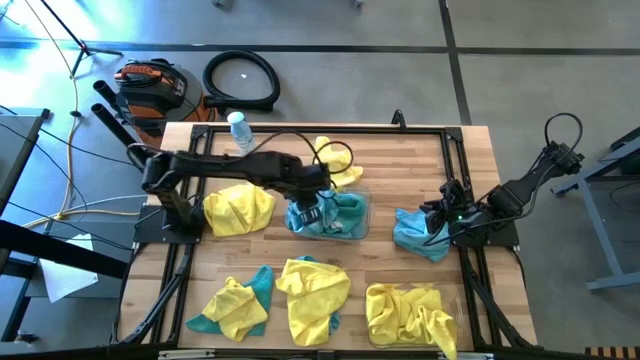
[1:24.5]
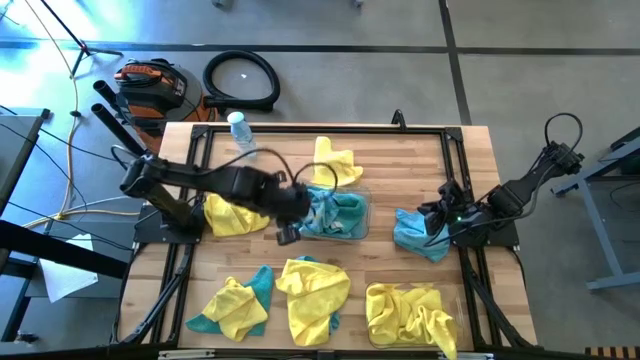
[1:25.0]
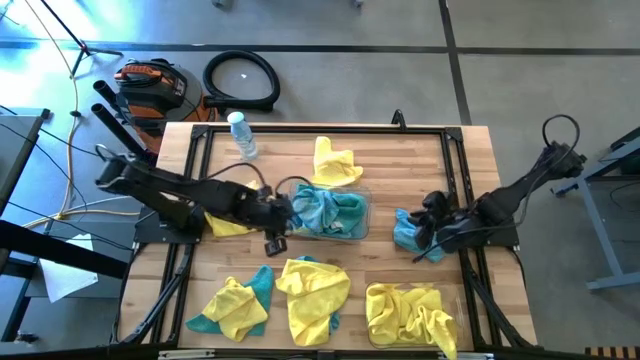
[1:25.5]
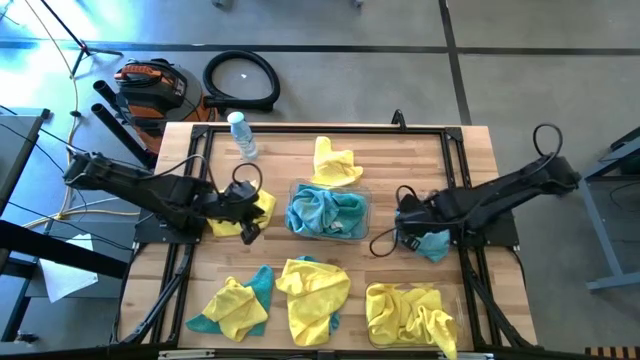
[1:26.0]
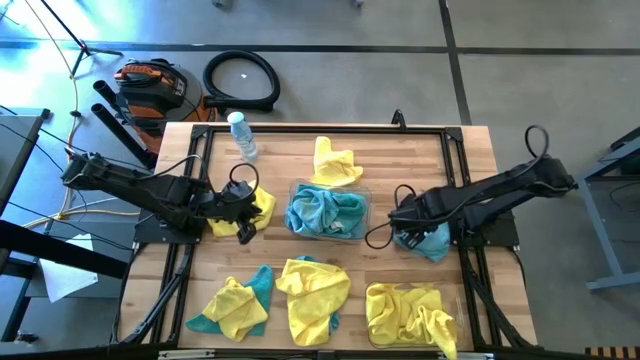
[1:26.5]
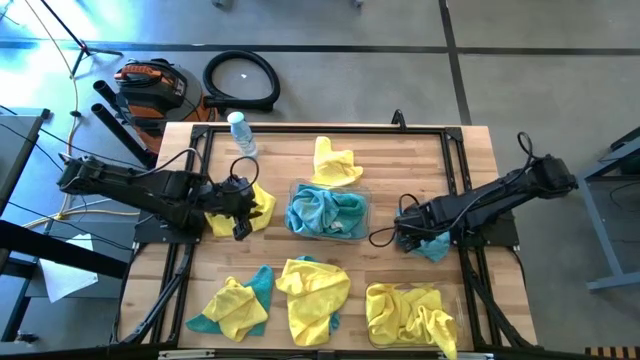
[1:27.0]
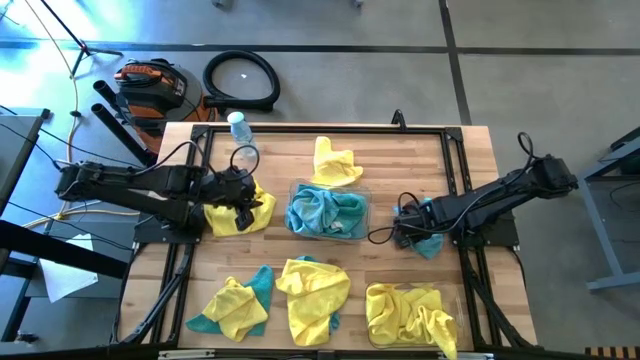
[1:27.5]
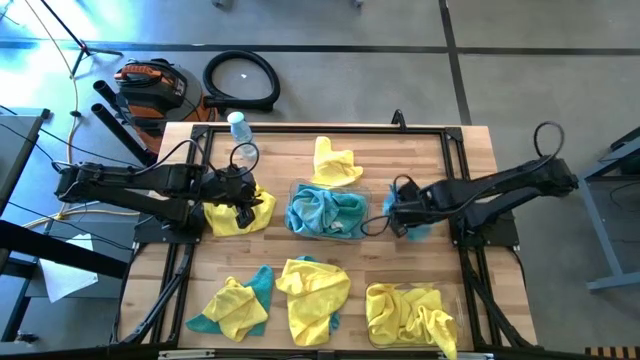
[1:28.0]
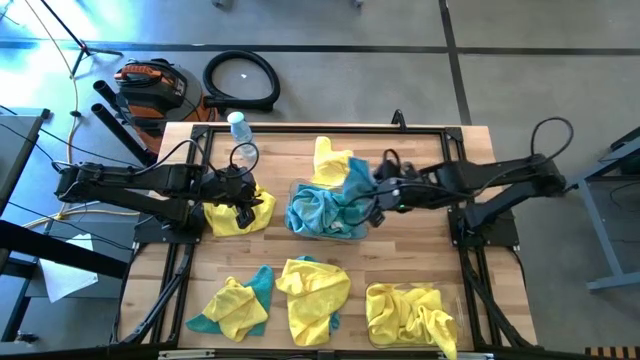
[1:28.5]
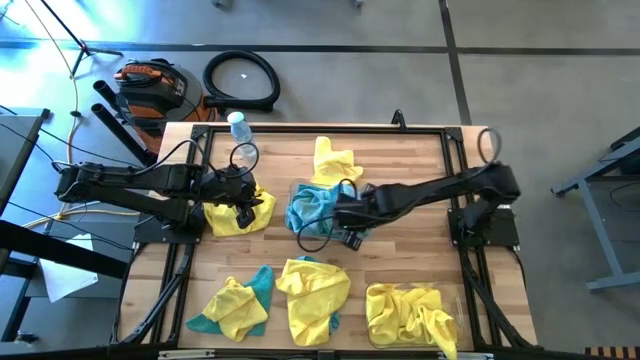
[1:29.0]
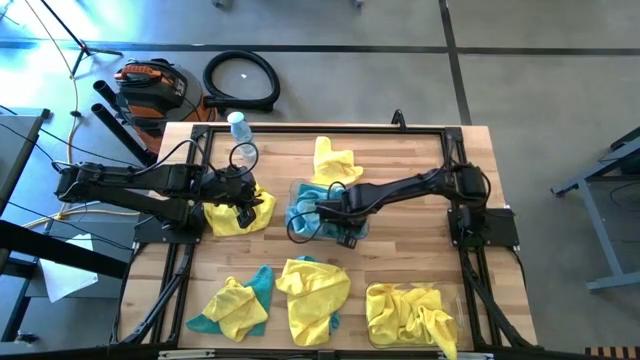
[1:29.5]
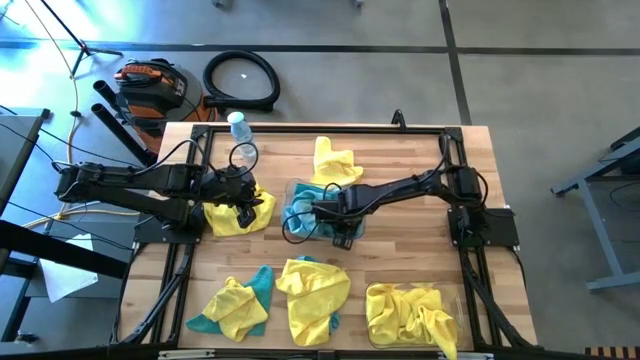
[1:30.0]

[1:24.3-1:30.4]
Task: Sort microfiber towel by color & place in baskets
Put the blue towel in the top transparent bin

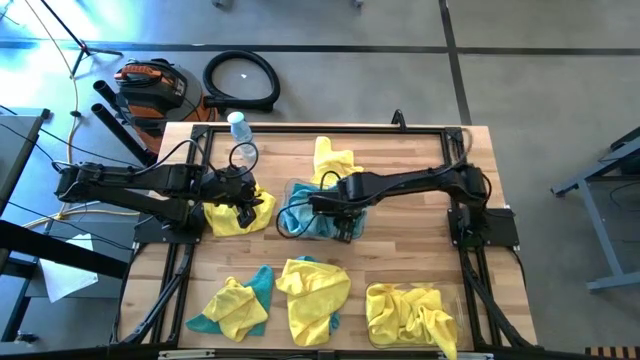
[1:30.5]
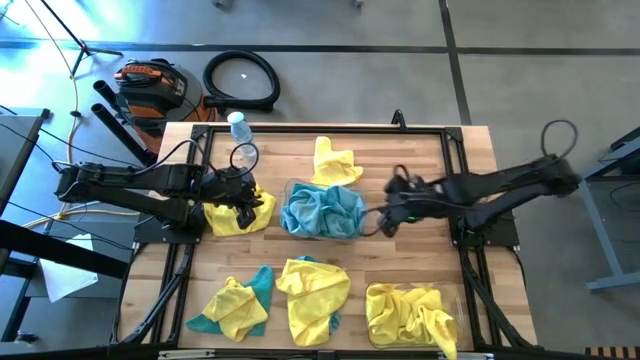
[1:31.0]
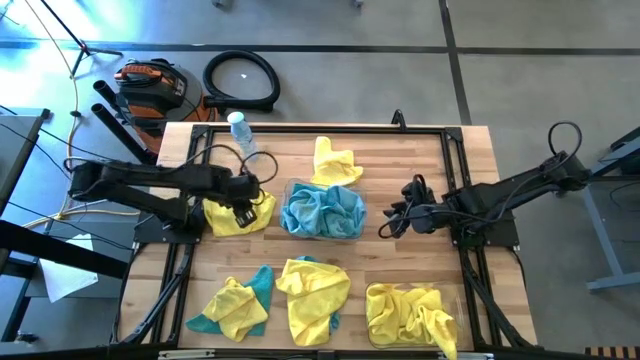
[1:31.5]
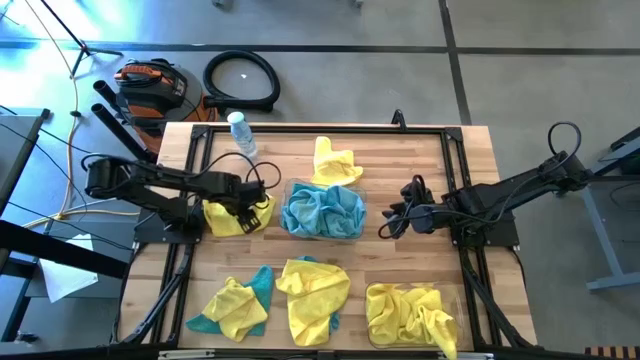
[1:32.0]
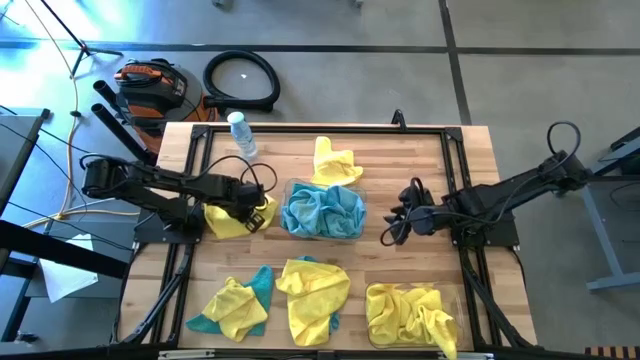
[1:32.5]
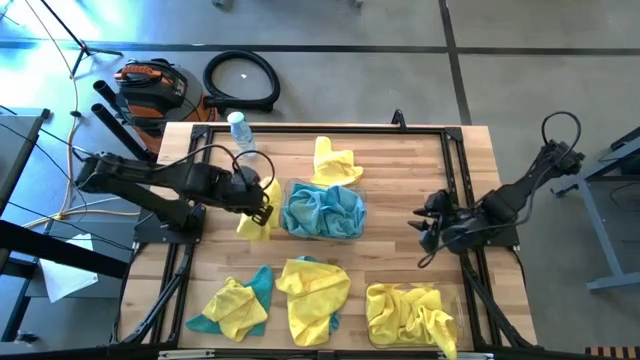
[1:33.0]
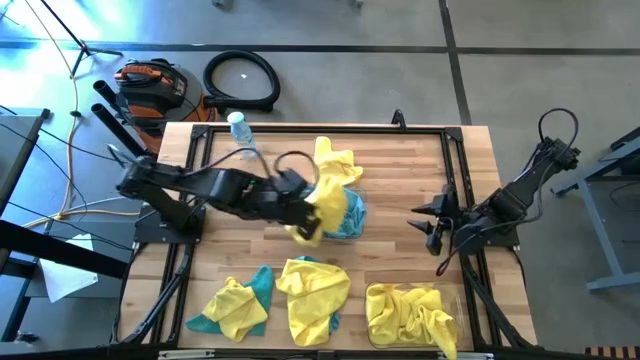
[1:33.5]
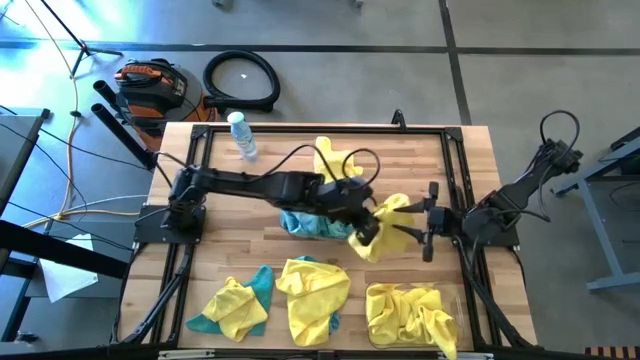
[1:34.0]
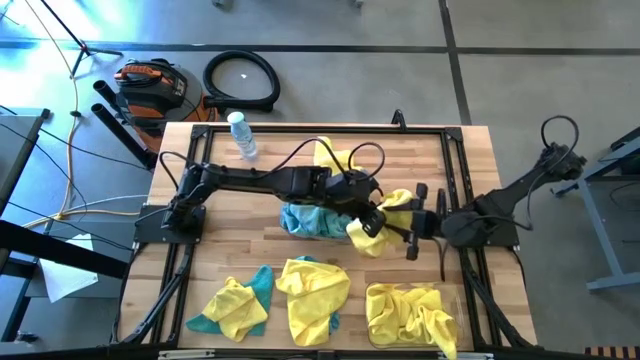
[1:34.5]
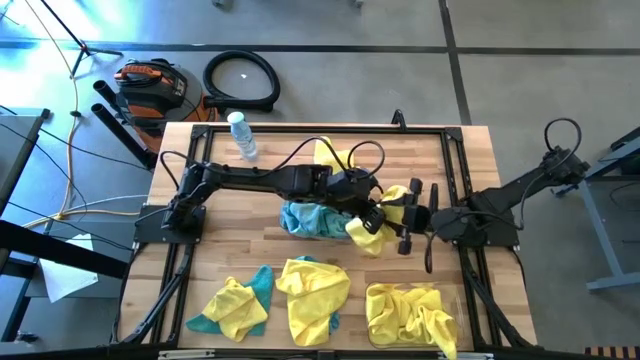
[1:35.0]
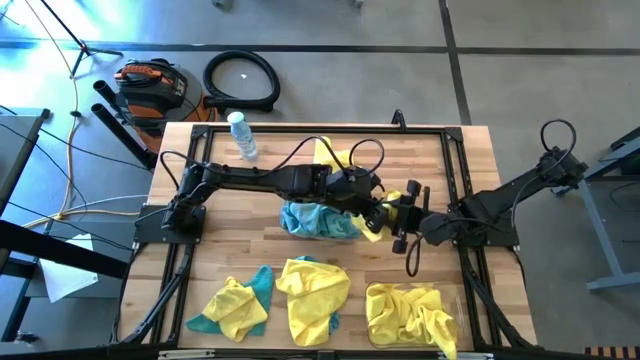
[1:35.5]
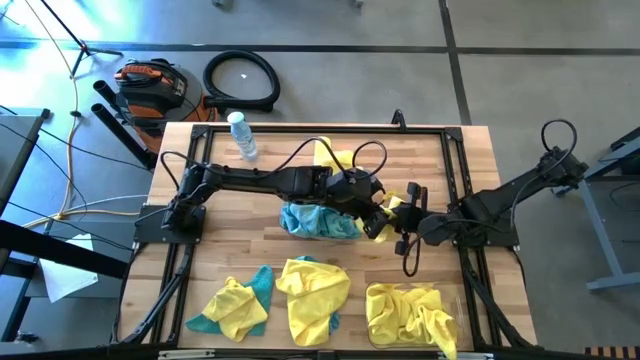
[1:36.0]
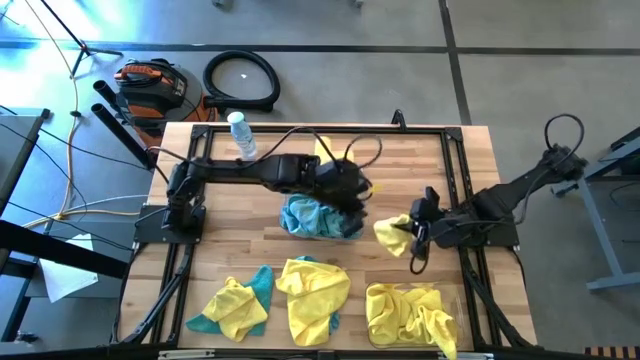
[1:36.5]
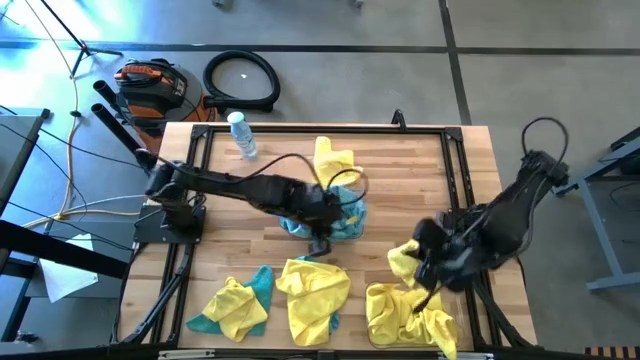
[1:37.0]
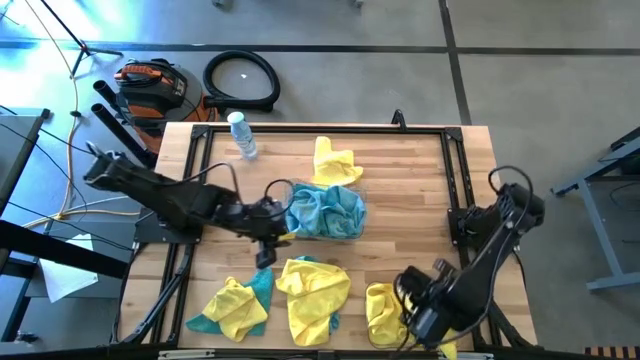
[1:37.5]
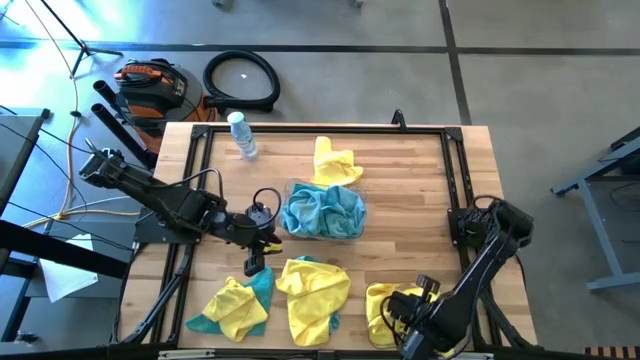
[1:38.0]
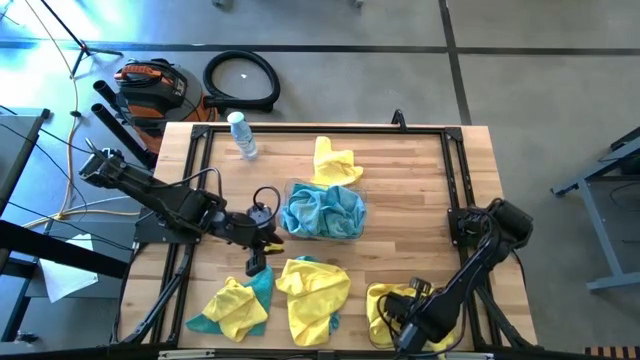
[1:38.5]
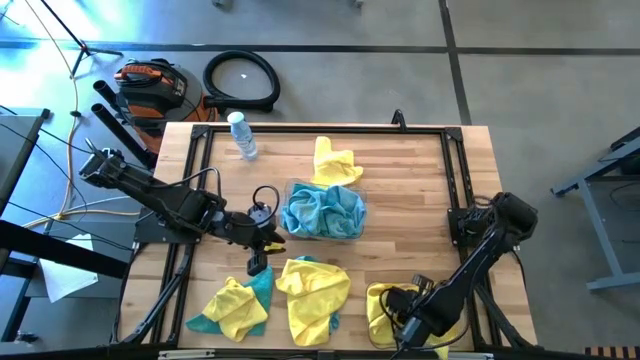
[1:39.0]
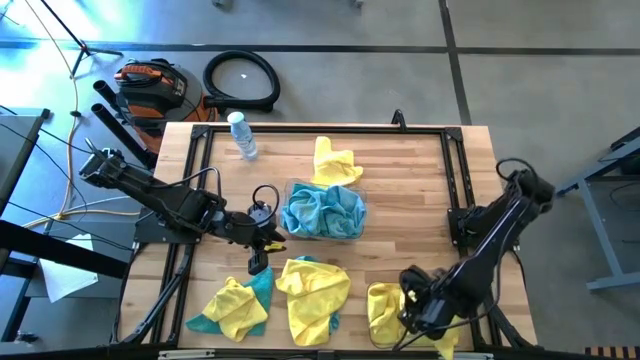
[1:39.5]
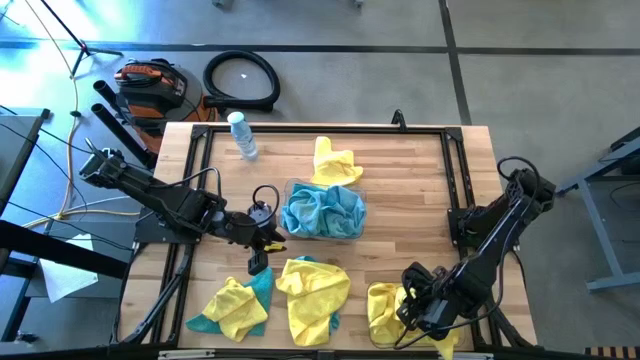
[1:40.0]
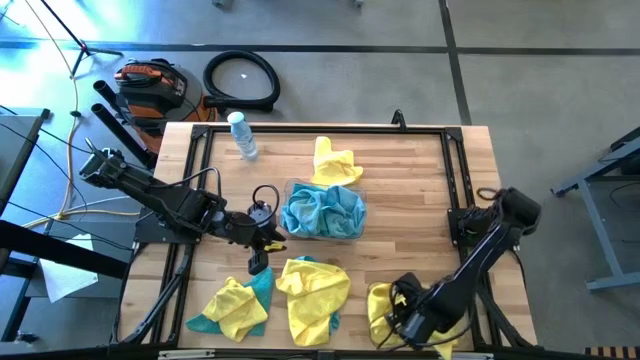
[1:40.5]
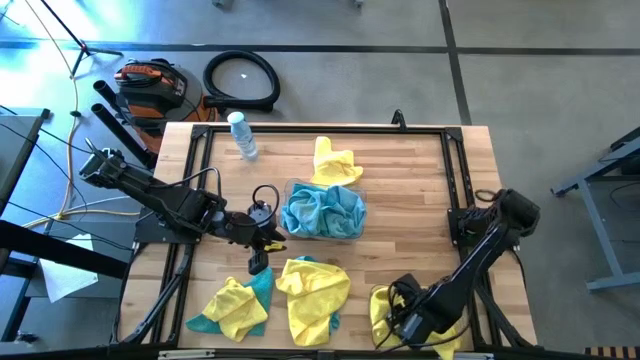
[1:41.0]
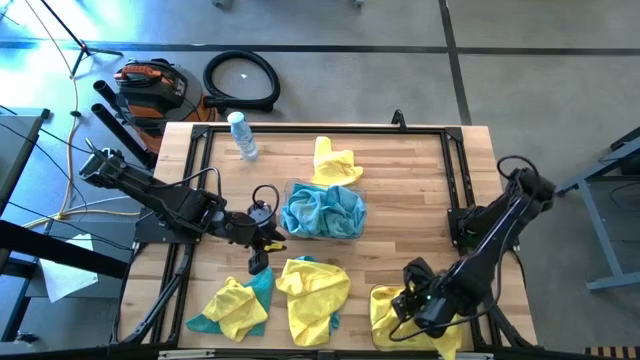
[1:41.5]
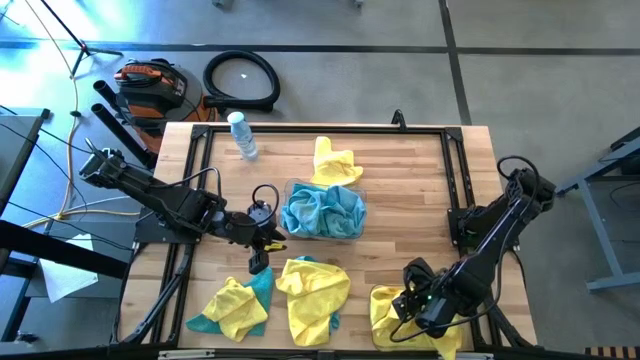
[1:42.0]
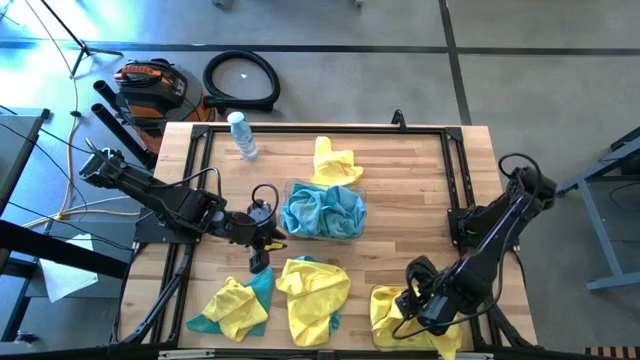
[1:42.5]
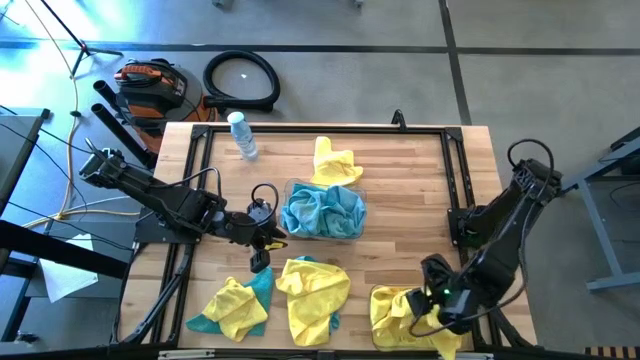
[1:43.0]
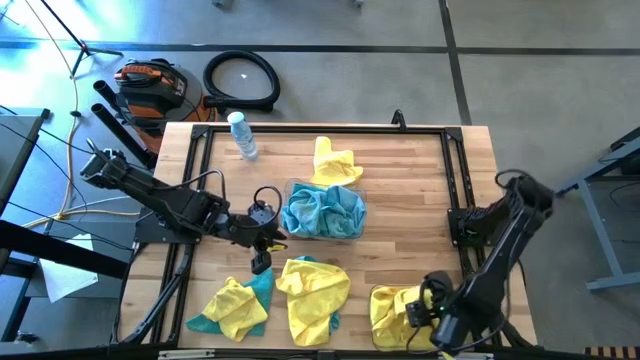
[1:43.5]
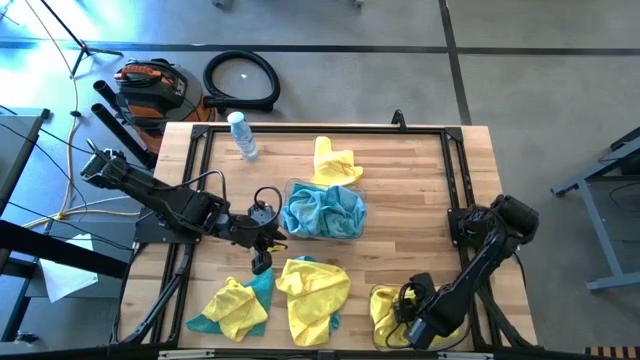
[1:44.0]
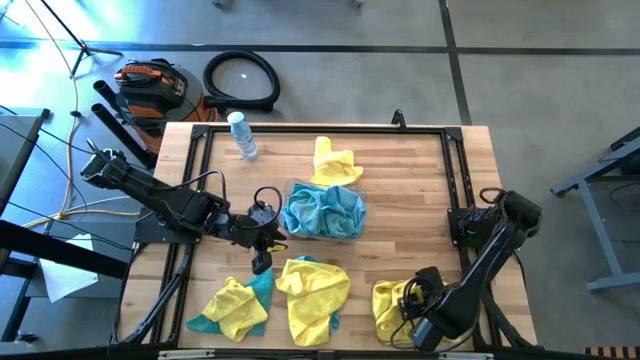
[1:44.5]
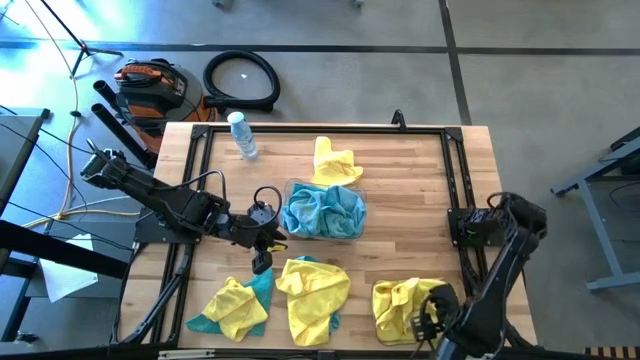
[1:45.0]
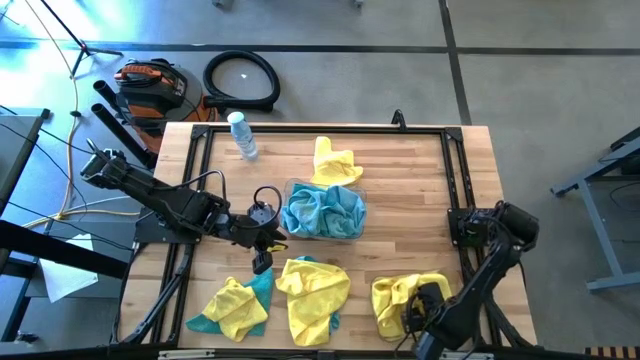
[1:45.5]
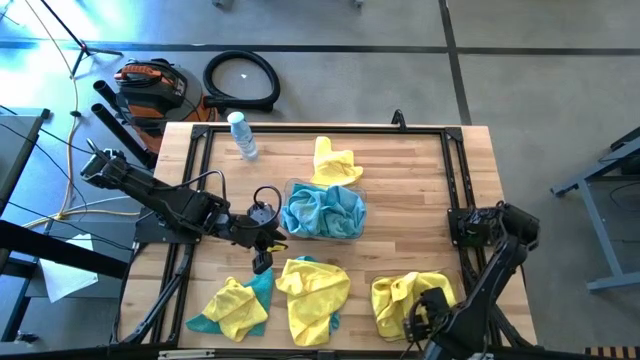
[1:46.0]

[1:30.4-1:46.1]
Put the yellow towel in the bottom transparent bin

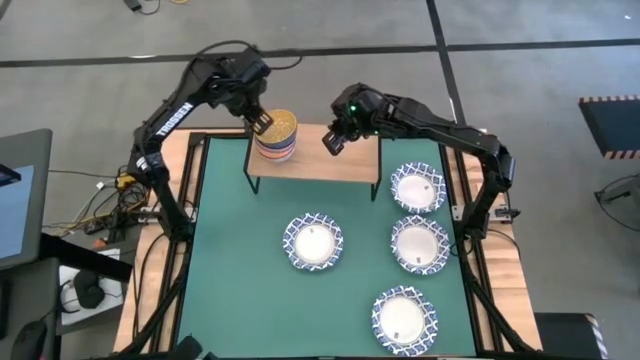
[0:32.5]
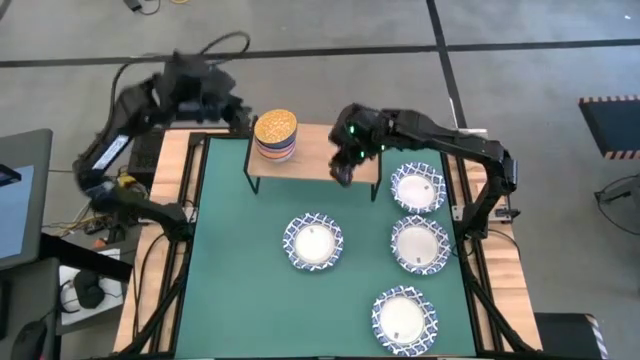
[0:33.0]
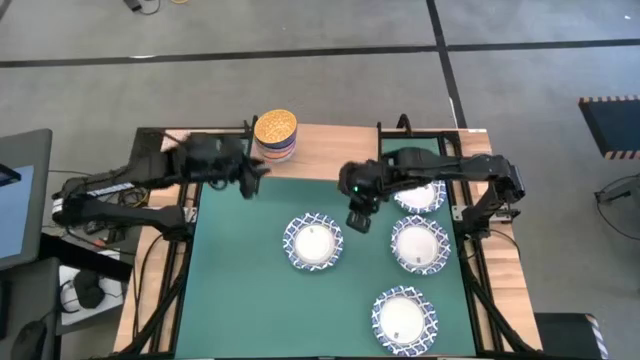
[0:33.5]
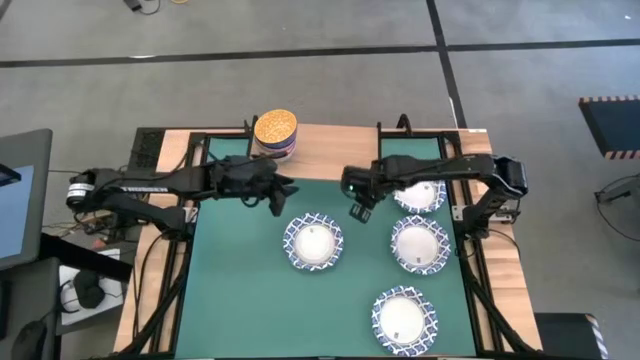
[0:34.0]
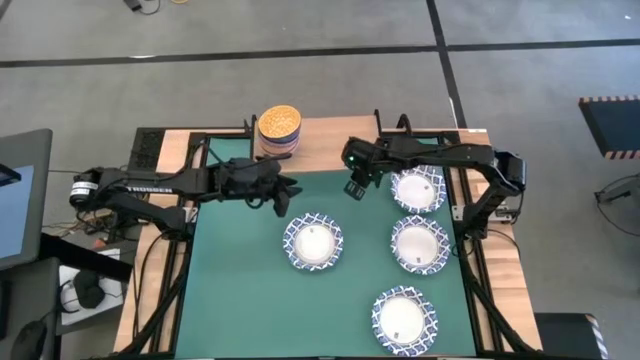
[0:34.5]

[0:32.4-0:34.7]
Task: Place and stack bowls onto a shelf
Adjust the shelf
